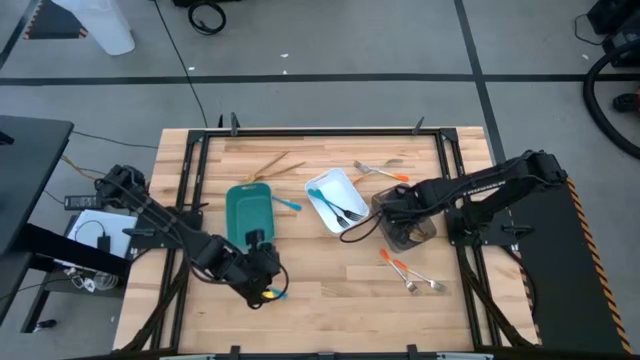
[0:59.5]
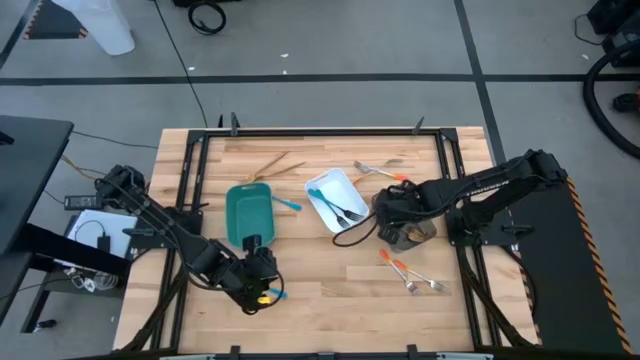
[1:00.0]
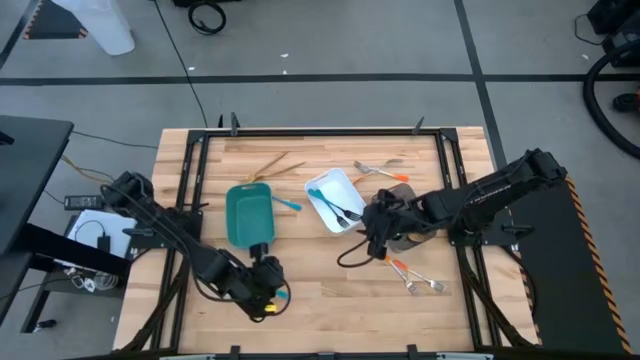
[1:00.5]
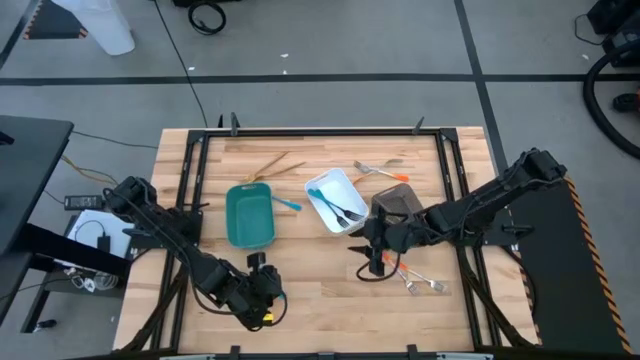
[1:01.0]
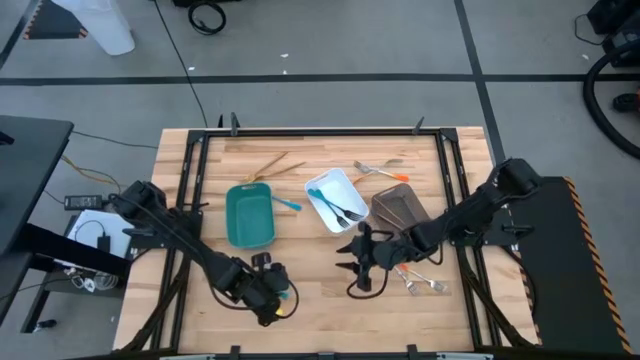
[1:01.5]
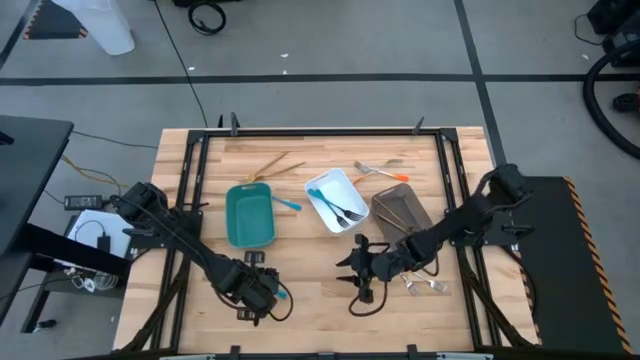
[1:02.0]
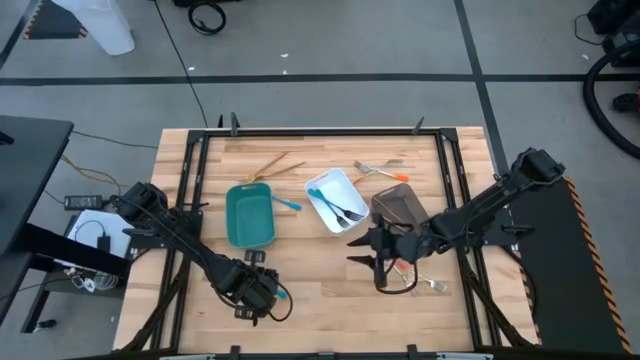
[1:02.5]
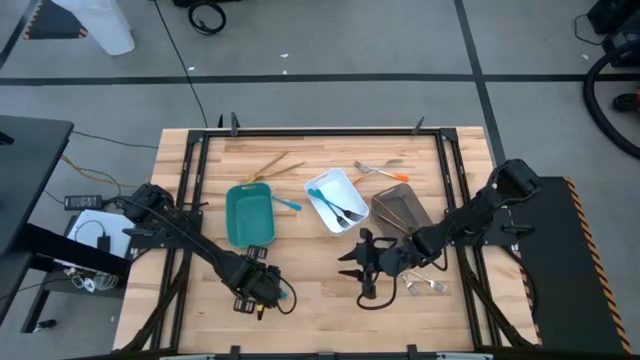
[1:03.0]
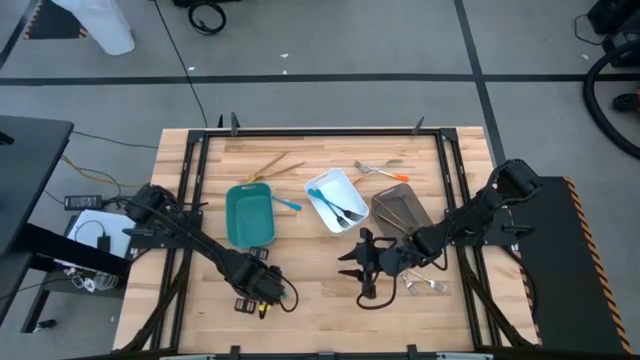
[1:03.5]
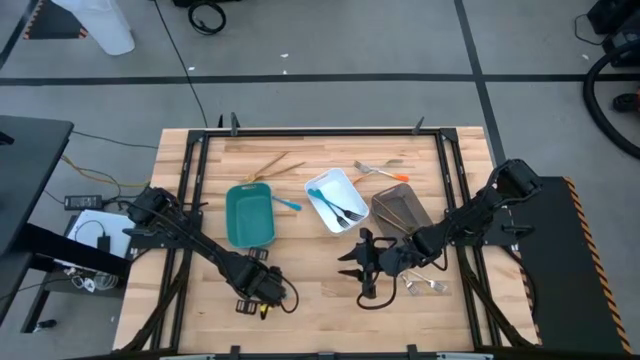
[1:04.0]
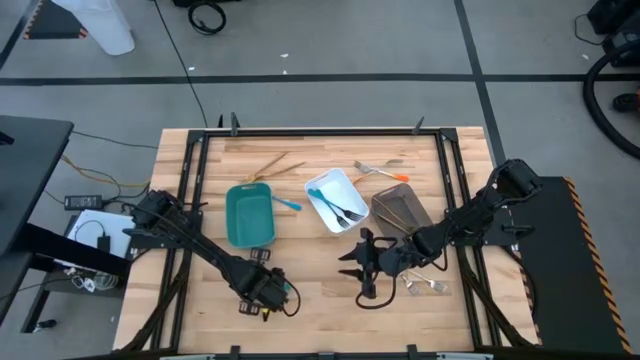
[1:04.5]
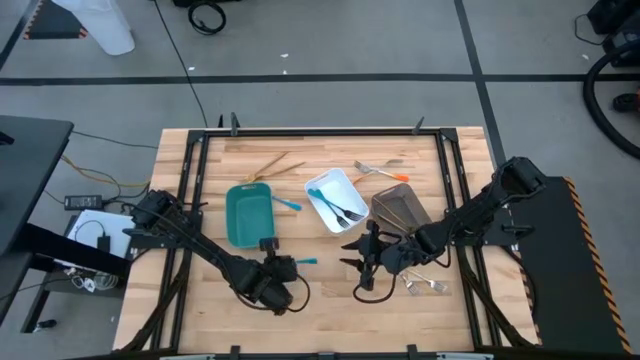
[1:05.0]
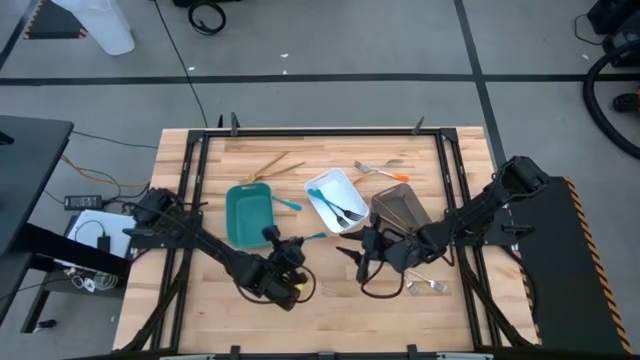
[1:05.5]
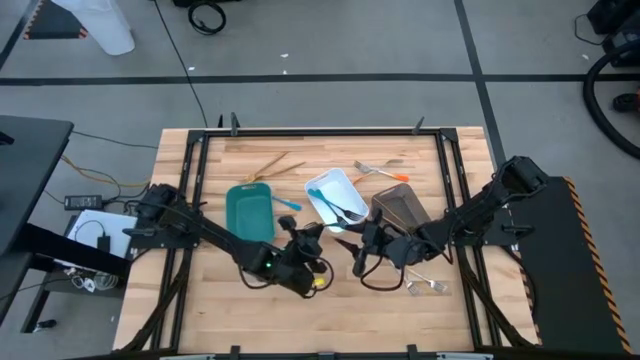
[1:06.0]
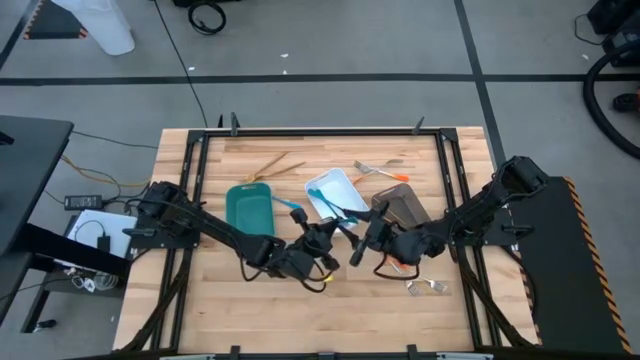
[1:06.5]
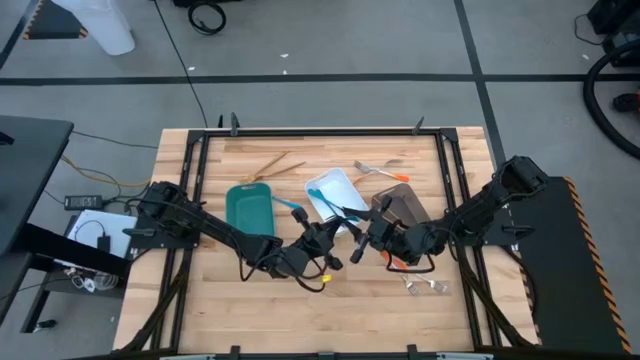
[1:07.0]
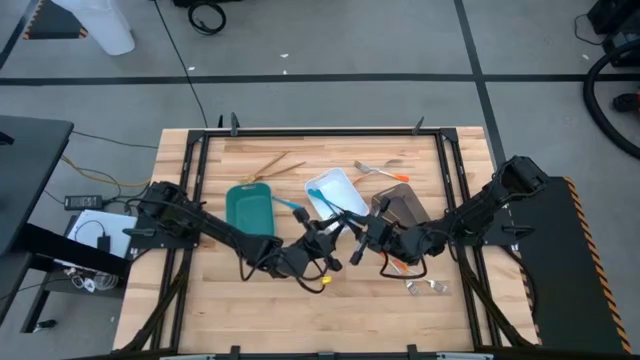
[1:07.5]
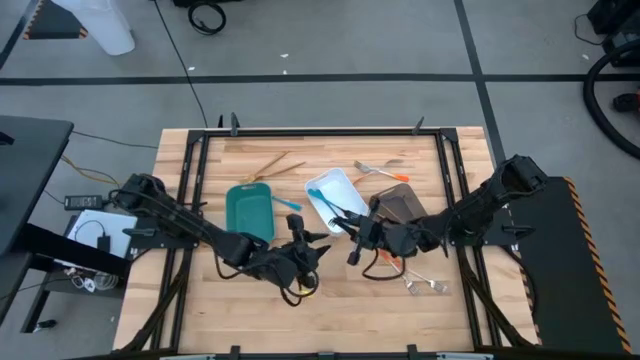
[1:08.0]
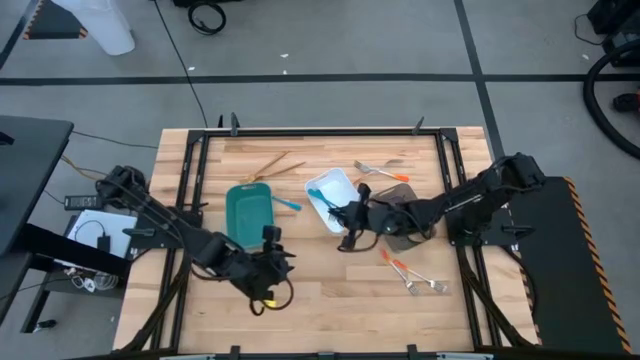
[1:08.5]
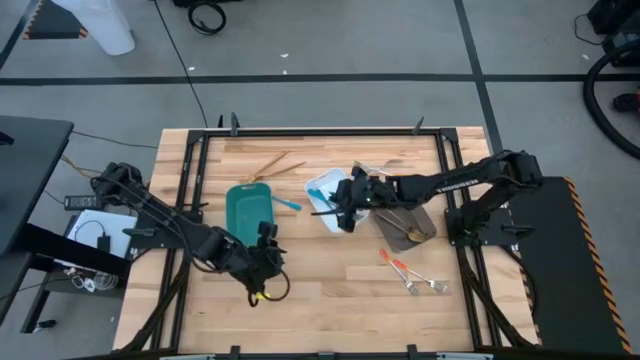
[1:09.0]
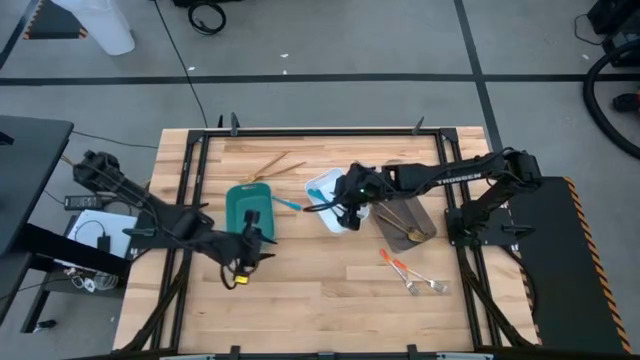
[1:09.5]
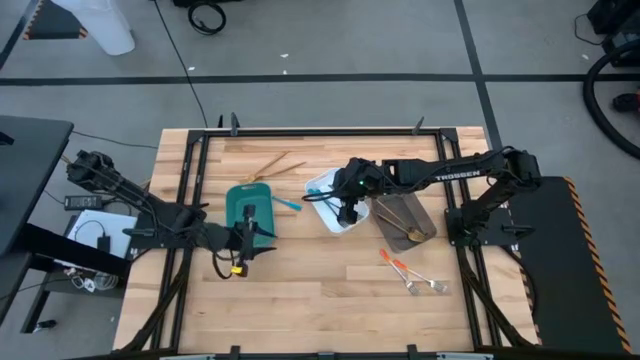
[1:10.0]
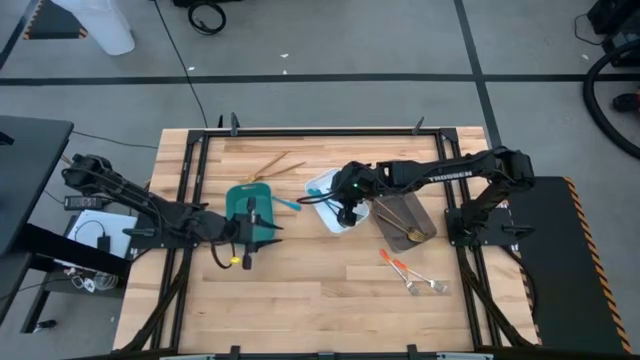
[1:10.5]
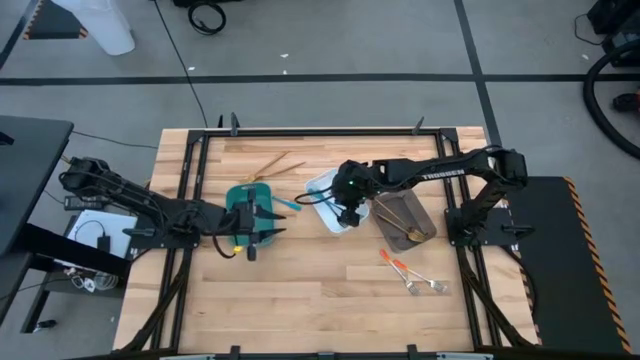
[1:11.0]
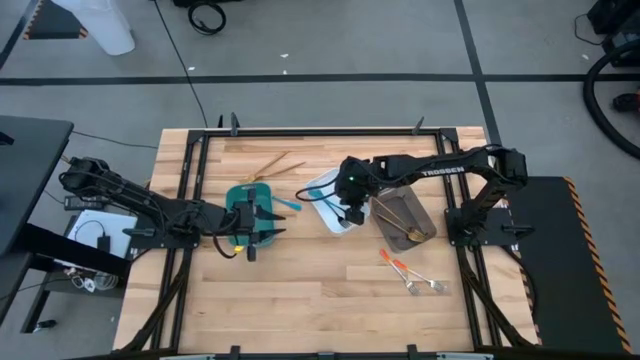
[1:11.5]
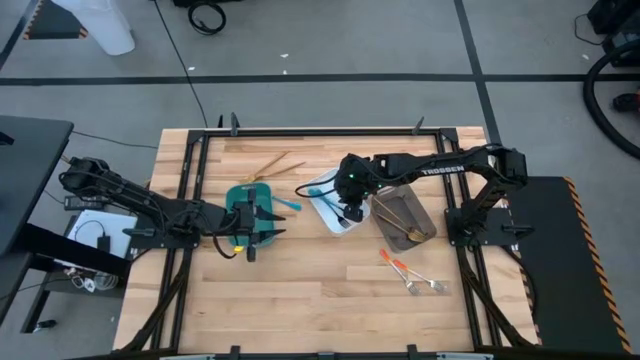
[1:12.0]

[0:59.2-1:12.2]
Task: Sort silverware by color (type)
Put the blue fork into the white bin

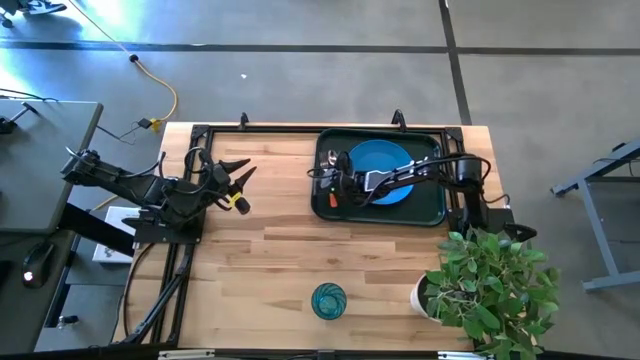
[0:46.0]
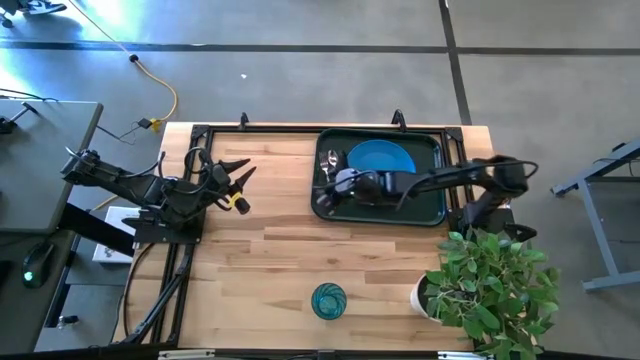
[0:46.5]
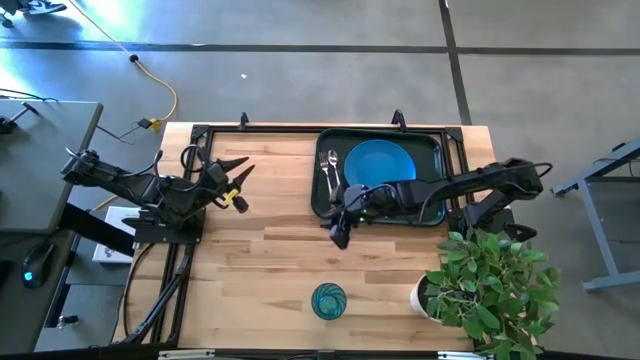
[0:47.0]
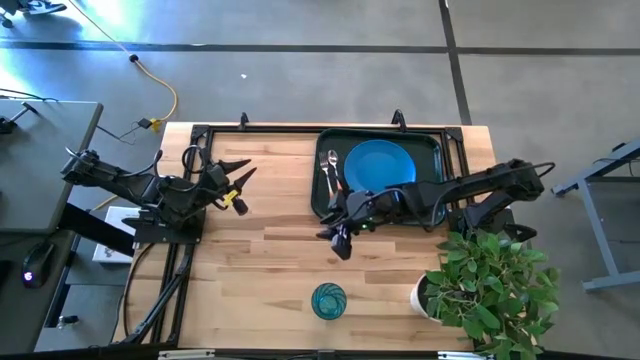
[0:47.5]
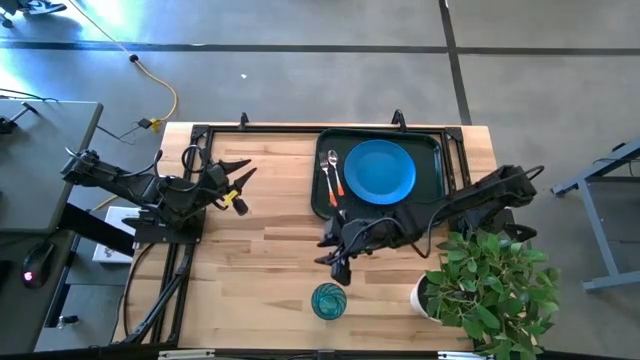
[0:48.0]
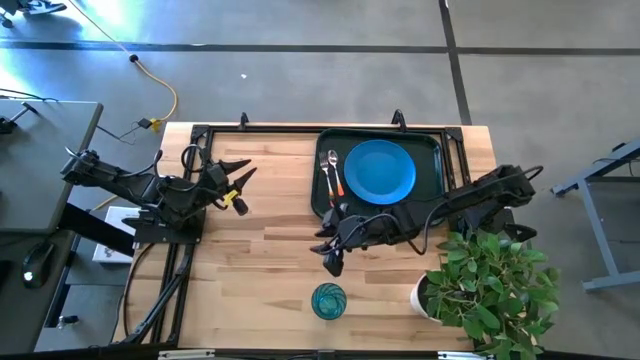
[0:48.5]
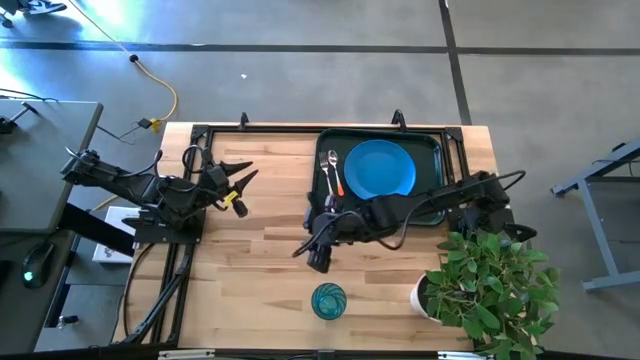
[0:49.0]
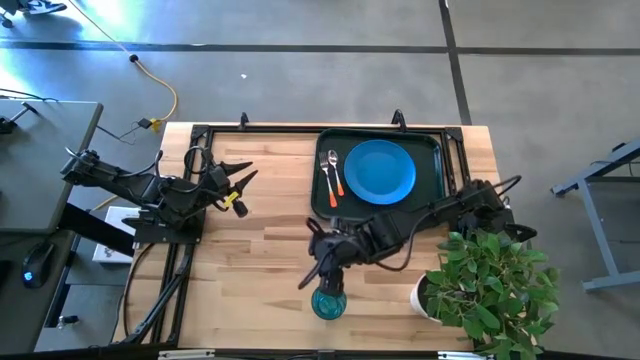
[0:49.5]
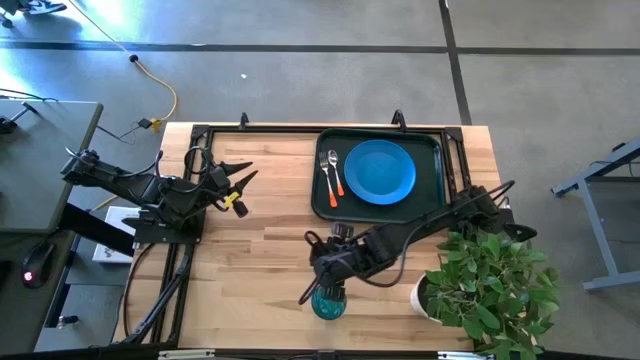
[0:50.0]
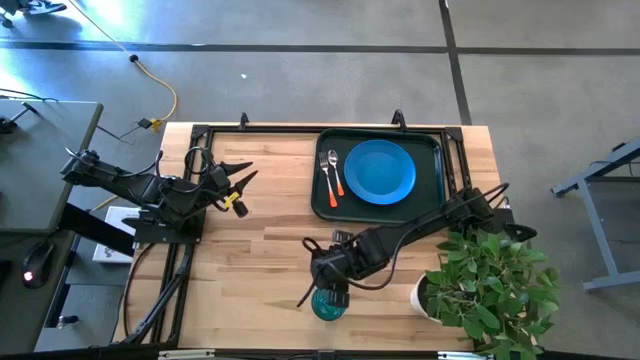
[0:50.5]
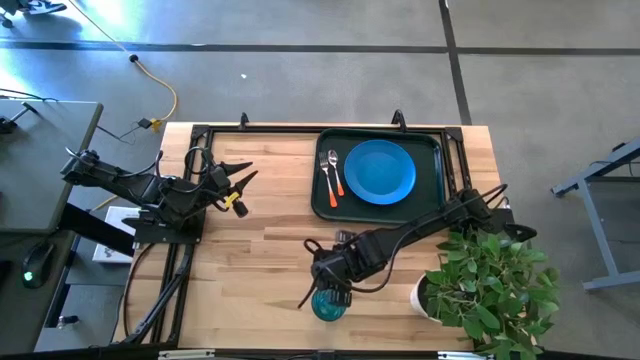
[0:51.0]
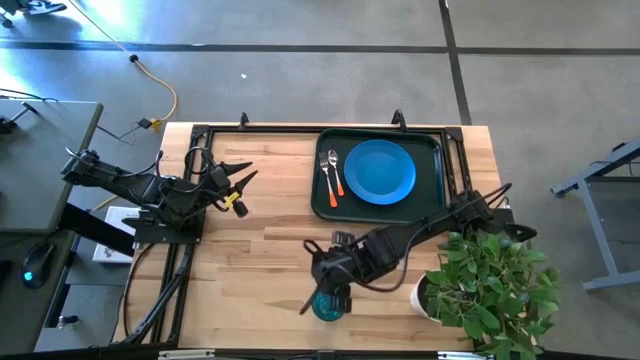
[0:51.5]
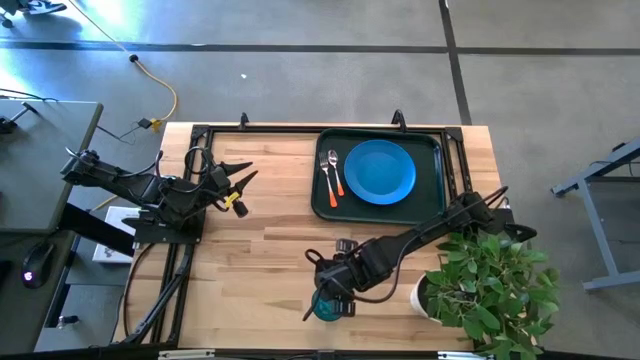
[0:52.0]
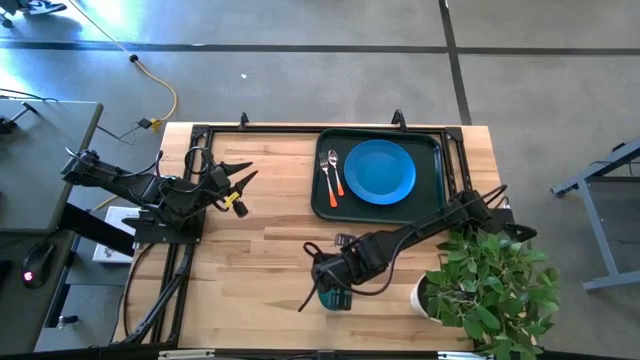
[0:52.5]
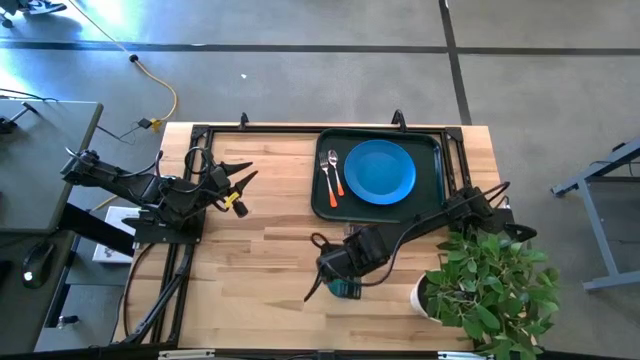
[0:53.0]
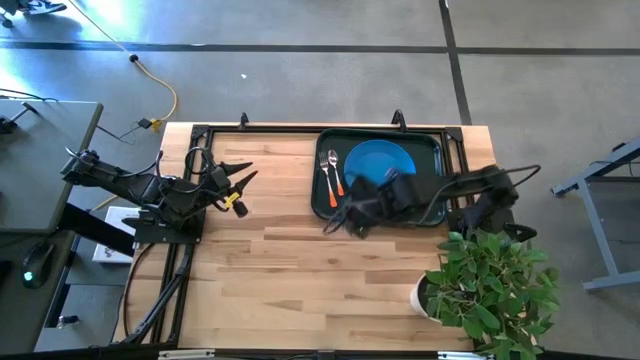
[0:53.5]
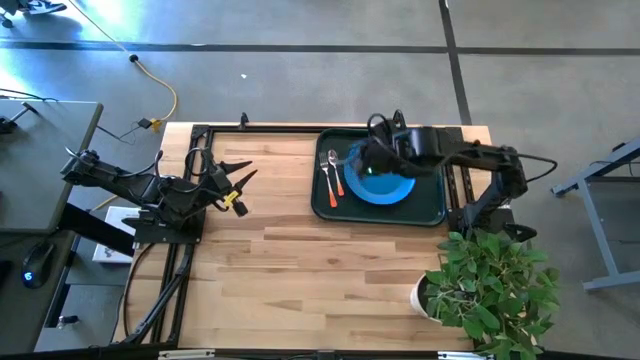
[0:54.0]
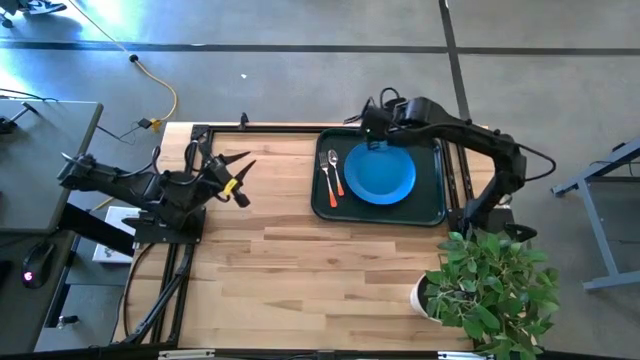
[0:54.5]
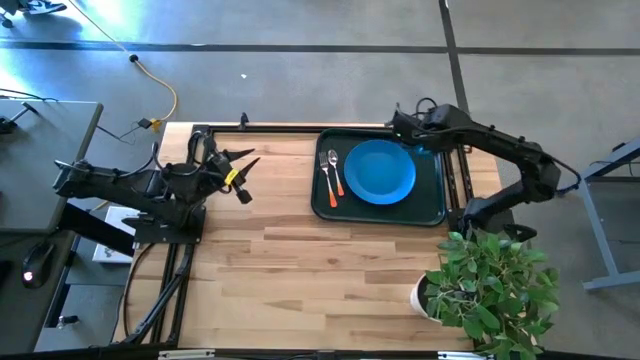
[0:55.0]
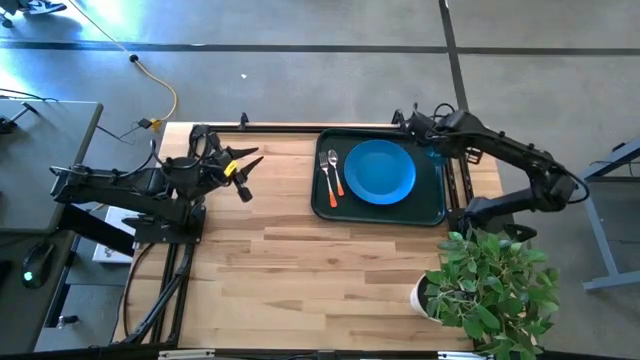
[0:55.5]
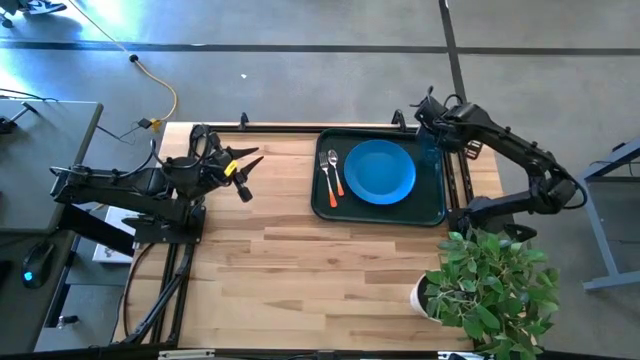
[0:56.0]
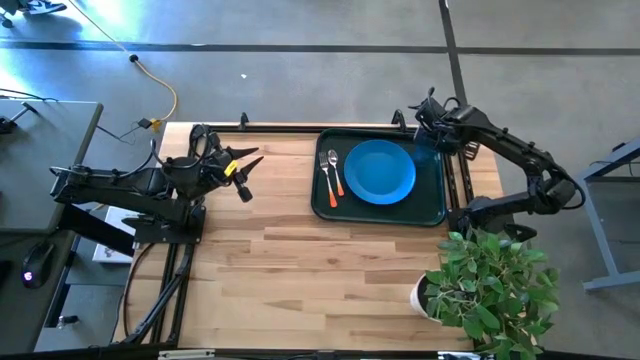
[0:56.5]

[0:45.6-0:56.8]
Task: Pick and place plate/cup/fork/spoon on tray
Put the blue cup on the green serving tray to the right of the blue plate
